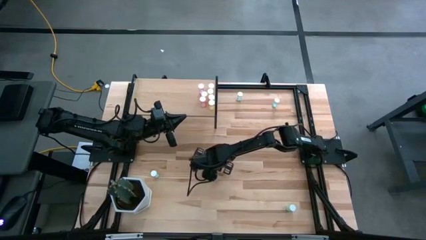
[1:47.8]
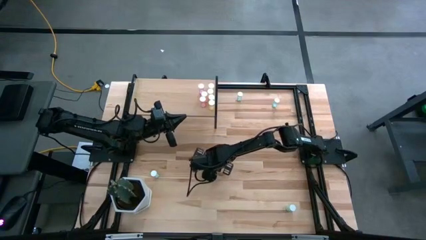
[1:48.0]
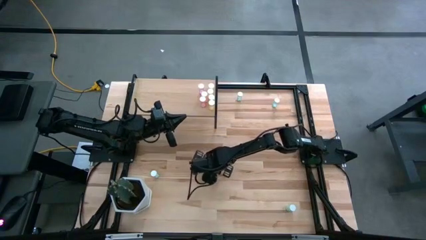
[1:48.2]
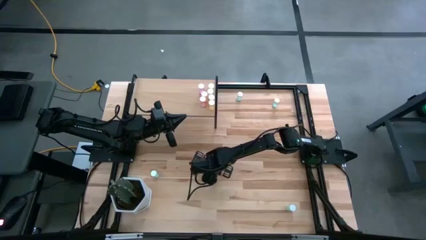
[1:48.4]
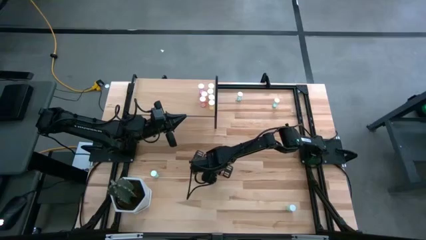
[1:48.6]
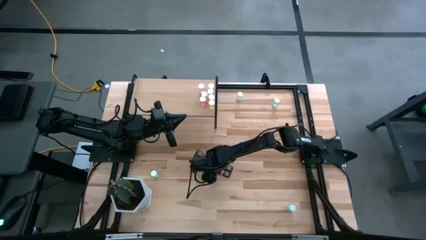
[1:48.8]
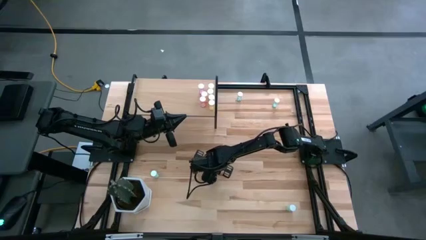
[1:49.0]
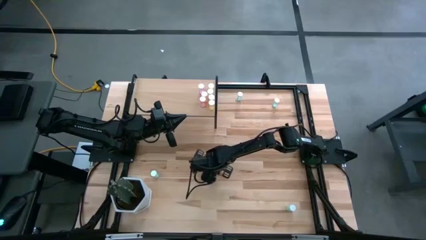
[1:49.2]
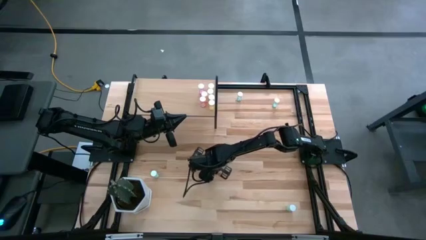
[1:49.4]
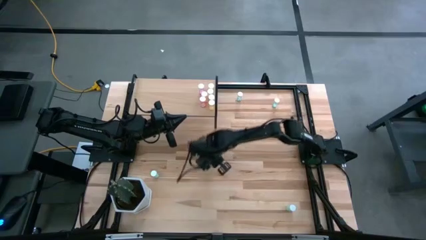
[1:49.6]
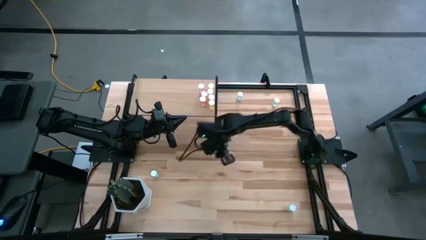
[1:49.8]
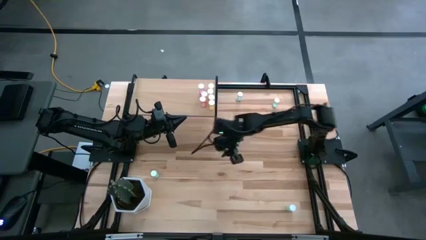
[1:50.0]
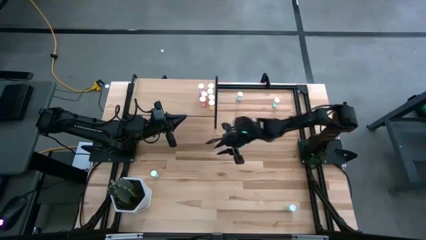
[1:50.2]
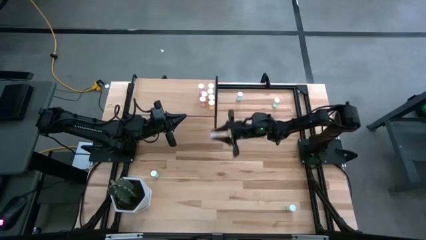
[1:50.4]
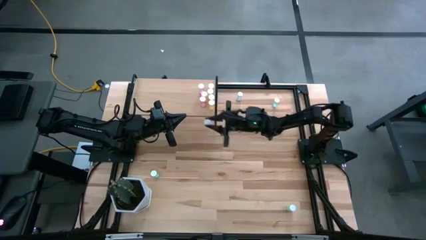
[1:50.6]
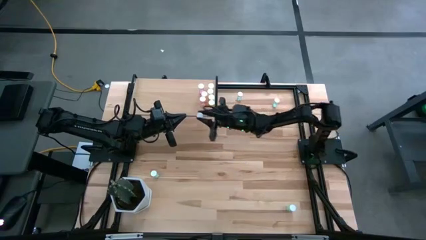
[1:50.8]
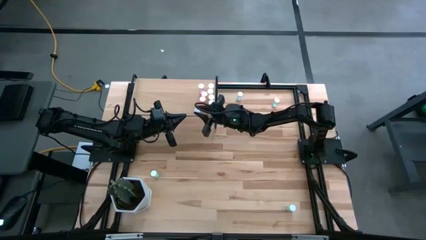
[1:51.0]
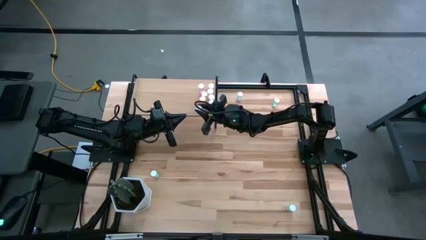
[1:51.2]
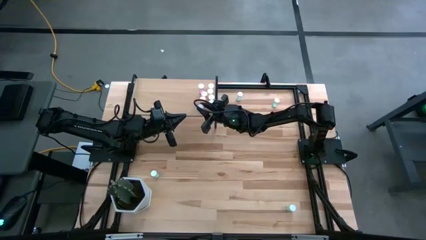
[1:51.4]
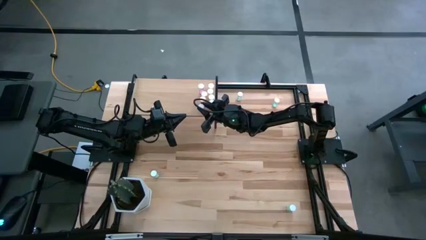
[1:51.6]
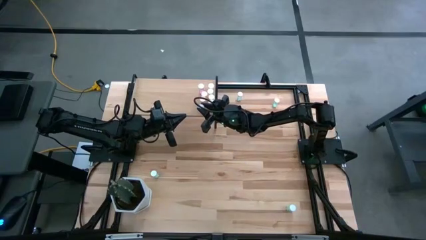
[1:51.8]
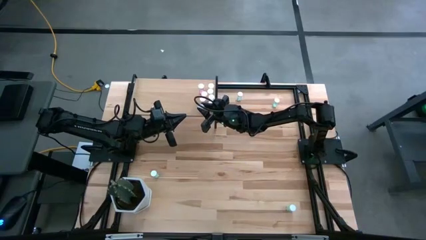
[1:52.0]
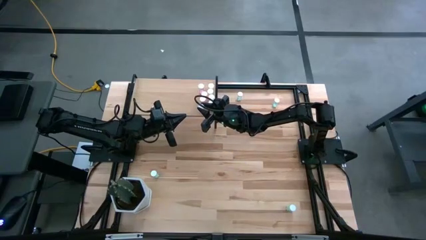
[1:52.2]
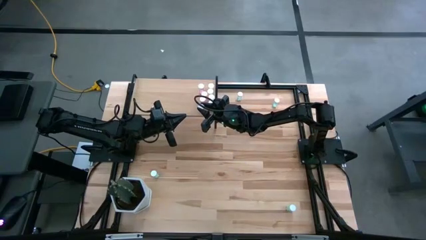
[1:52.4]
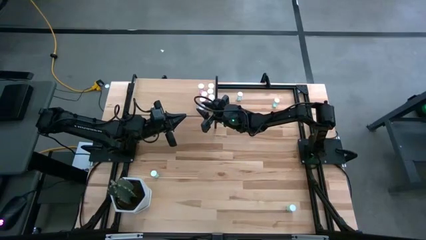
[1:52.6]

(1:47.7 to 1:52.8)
Task: Pick and place medicine bottles onto shelf by color
Put the orange pill bottle on the shelf

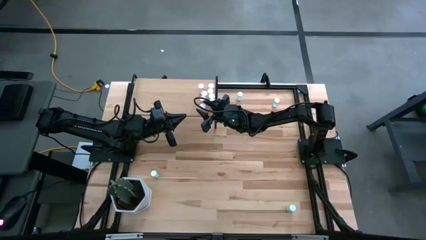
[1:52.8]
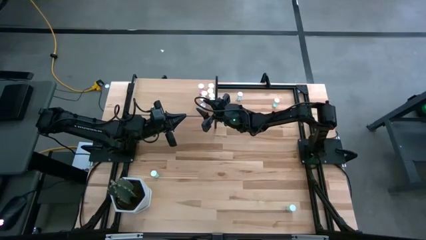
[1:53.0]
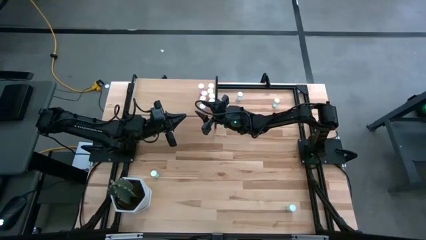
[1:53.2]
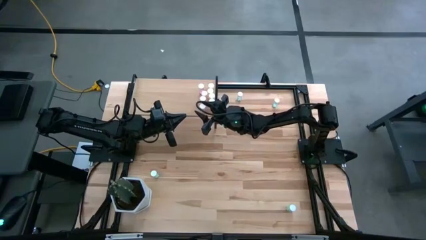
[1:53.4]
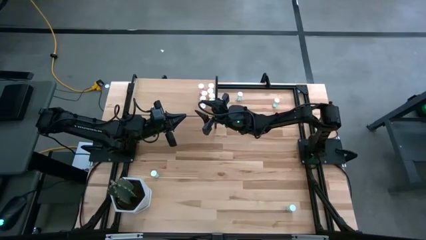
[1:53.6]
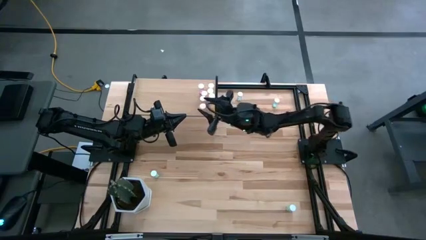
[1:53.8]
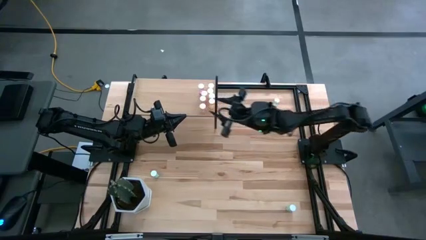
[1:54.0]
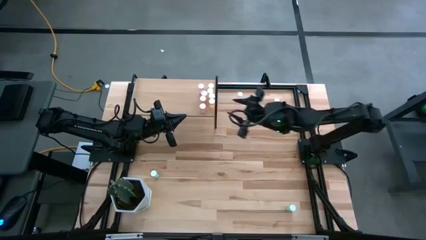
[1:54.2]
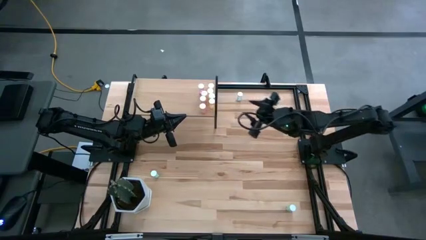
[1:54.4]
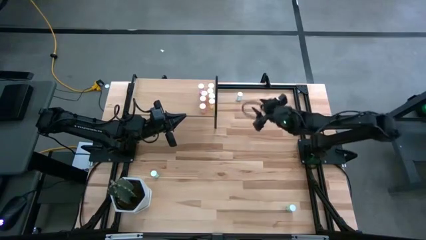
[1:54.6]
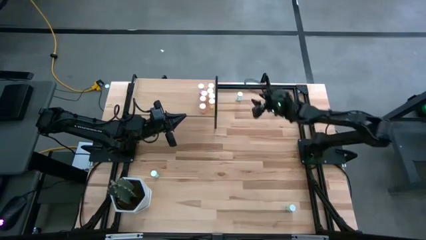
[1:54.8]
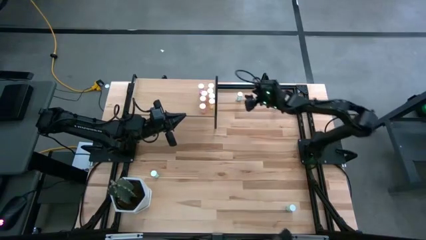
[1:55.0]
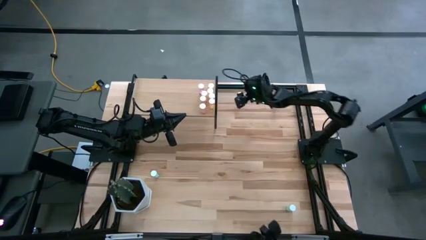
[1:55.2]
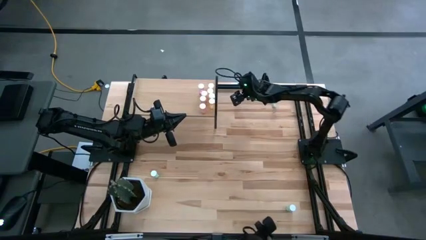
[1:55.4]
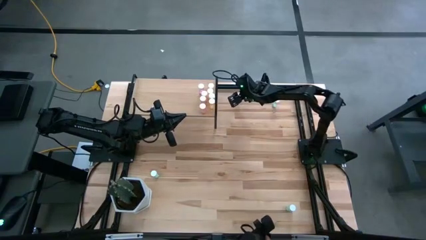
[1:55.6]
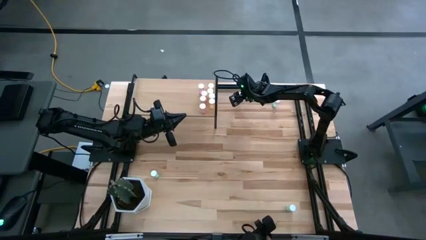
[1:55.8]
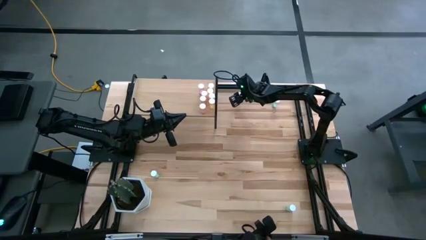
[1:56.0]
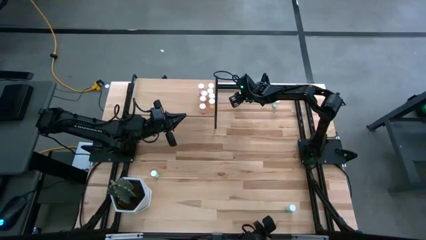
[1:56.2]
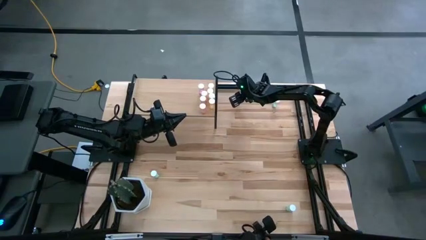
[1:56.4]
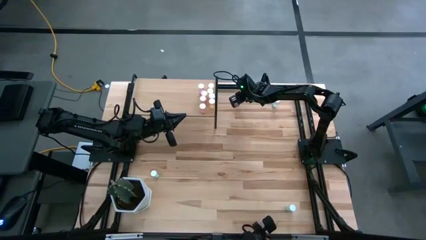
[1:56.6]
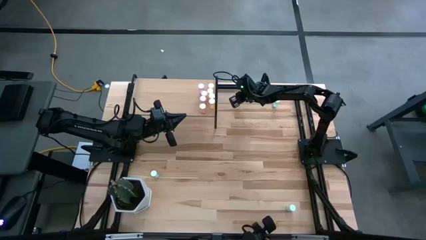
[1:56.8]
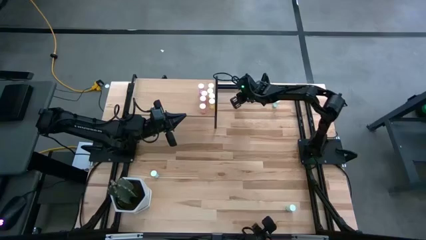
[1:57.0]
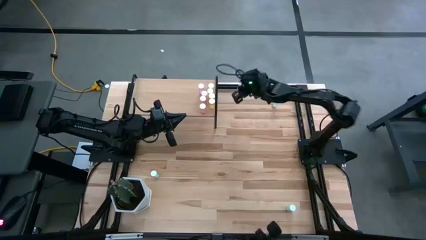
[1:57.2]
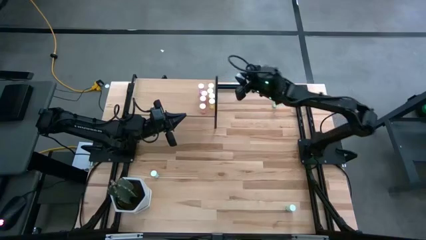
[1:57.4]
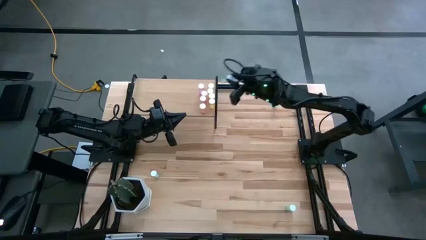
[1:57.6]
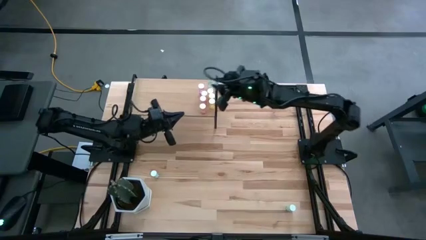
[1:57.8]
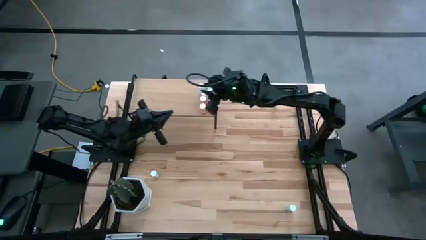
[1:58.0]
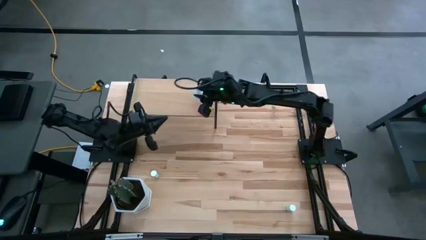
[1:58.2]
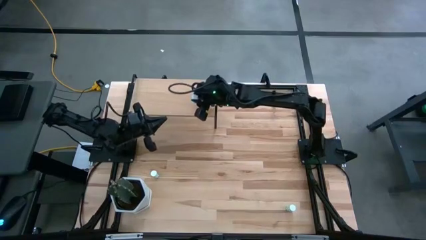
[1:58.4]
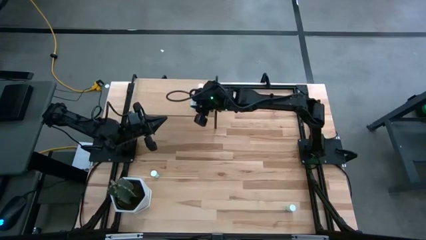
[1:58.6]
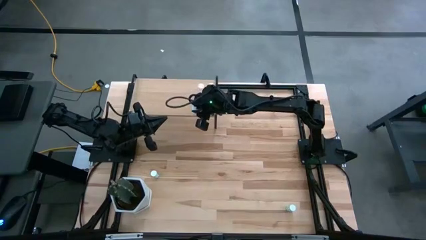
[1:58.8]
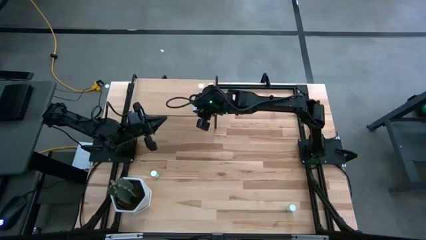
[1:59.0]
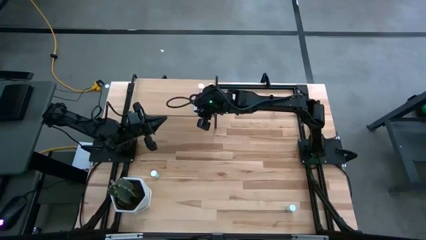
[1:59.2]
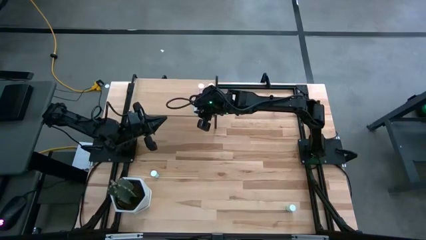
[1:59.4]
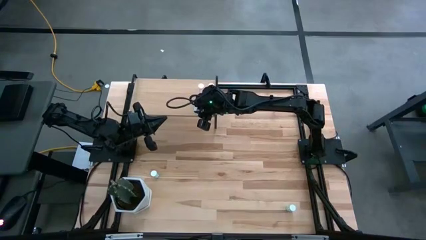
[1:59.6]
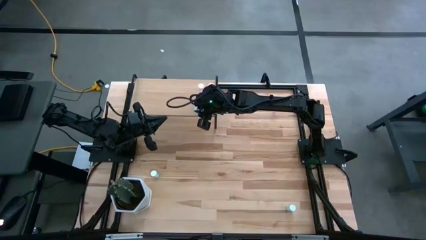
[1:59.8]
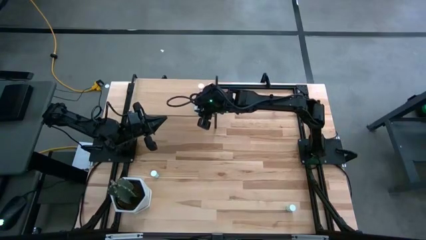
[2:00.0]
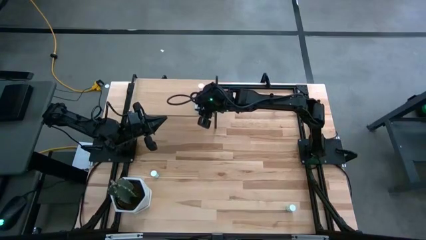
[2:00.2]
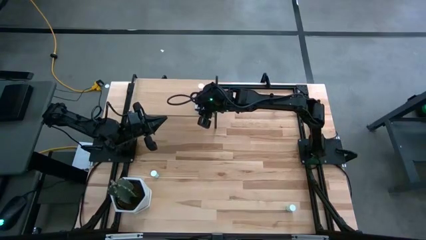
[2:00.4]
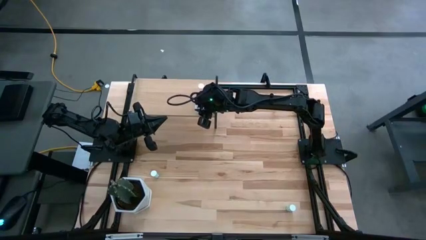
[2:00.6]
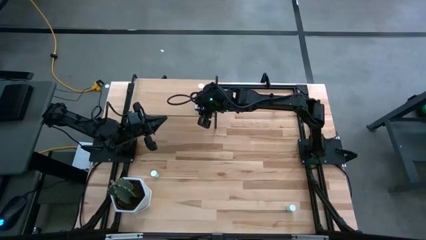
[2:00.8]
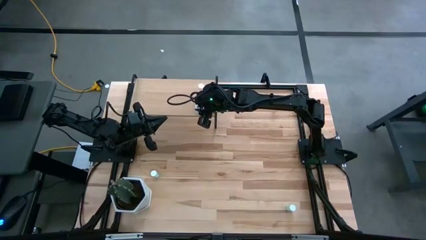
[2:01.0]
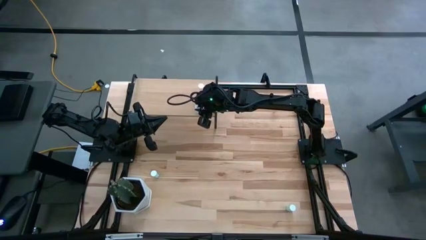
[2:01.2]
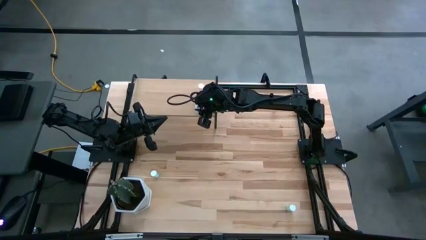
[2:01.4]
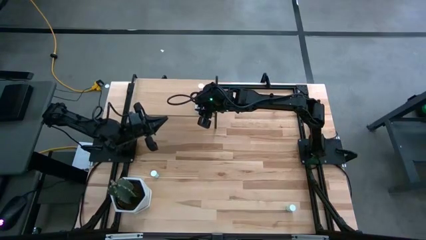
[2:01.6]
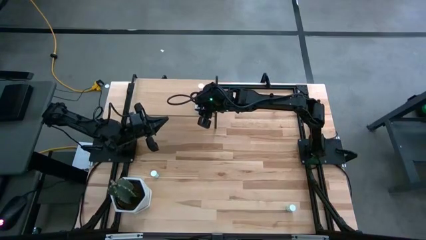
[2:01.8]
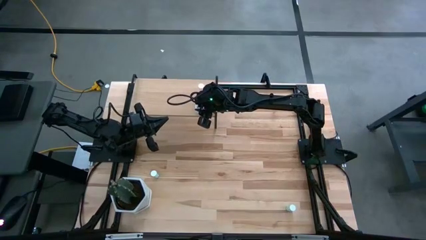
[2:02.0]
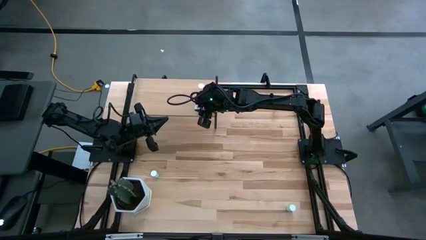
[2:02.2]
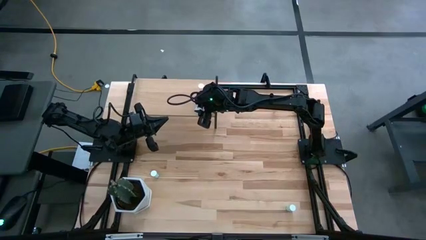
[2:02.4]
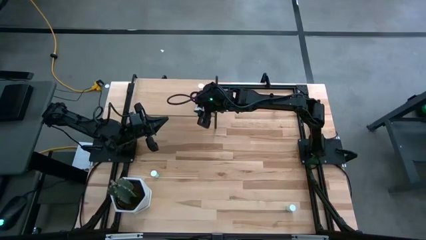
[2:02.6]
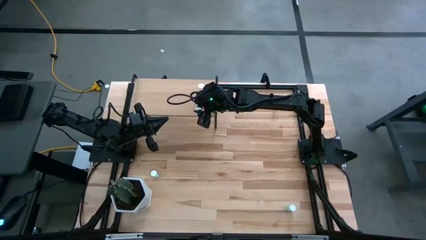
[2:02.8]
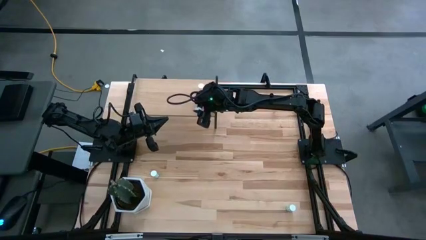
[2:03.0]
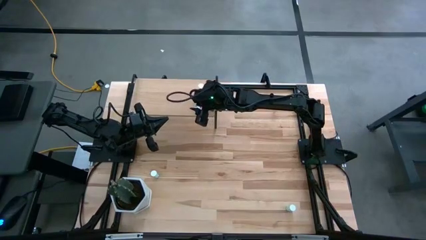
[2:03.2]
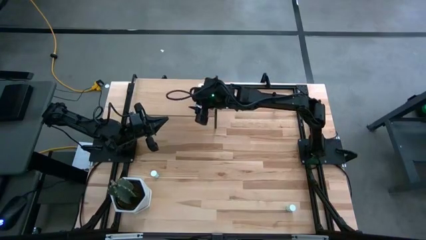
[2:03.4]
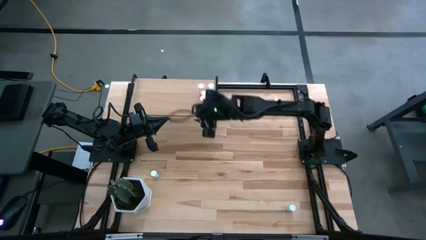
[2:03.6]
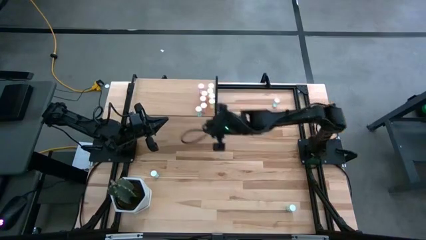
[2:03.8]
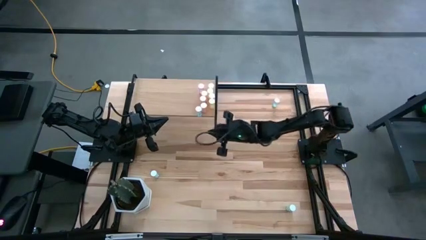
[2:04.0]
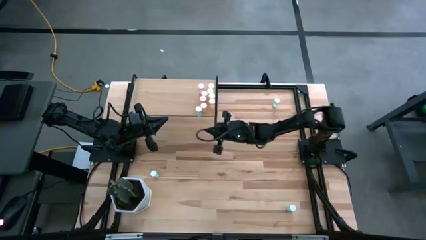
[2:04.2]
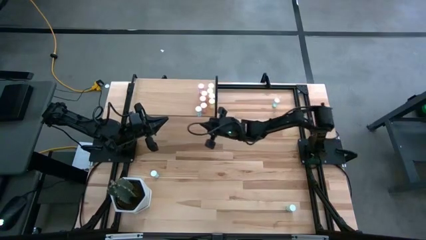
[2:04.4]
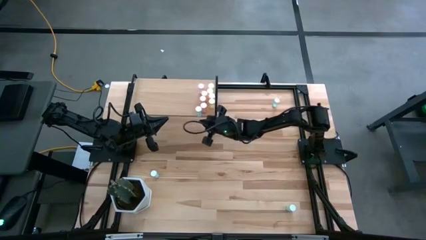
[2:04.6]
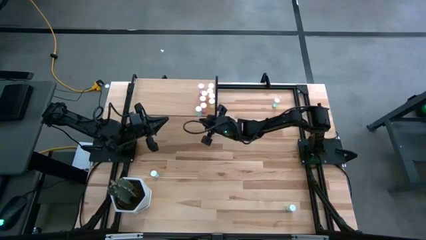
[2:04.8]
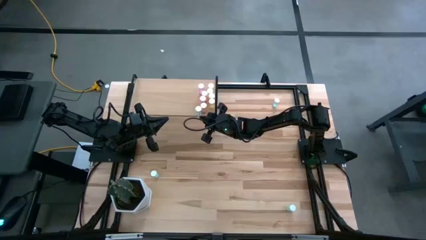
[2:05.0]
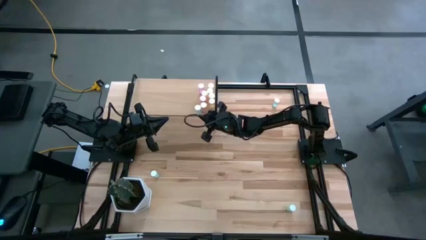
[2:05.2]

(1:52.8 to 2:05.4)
Put the top left green pill bottle on the shelf
